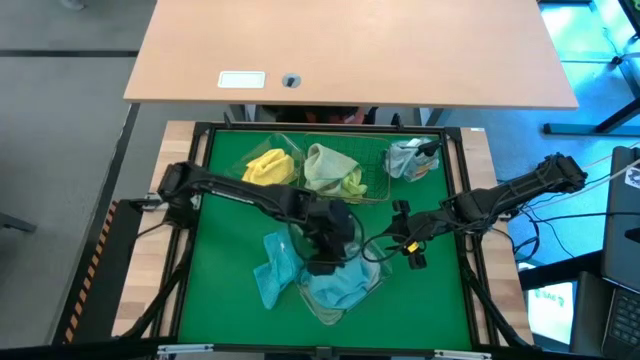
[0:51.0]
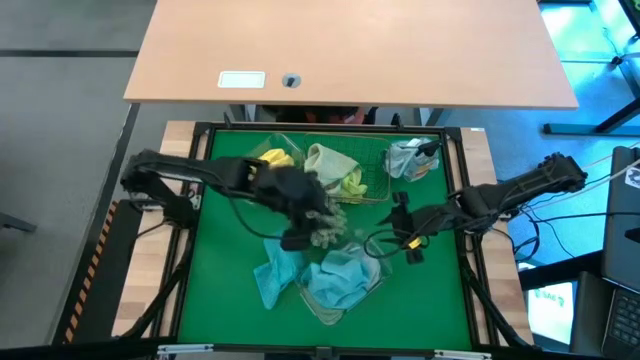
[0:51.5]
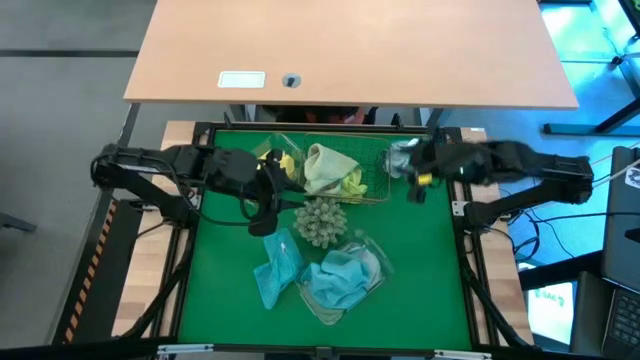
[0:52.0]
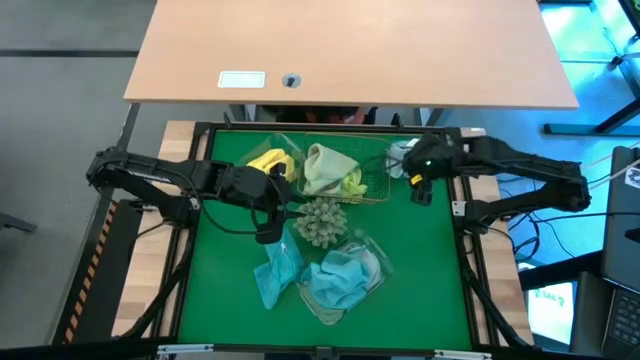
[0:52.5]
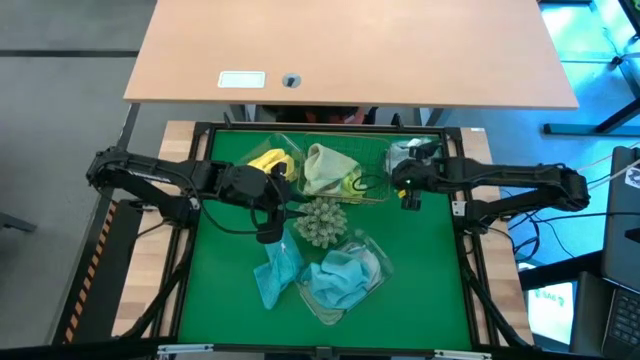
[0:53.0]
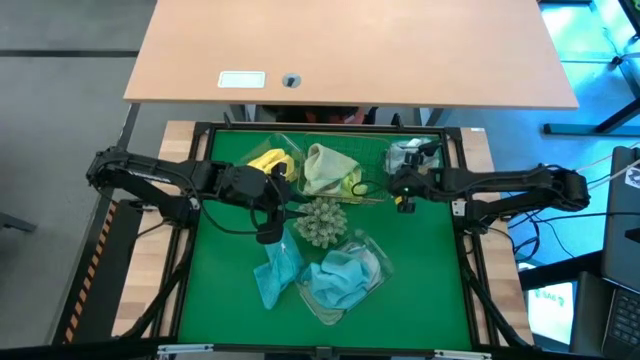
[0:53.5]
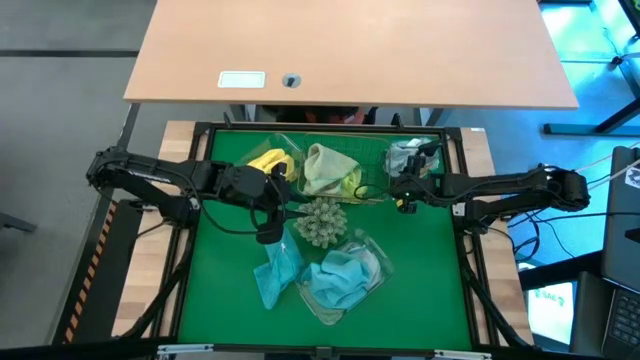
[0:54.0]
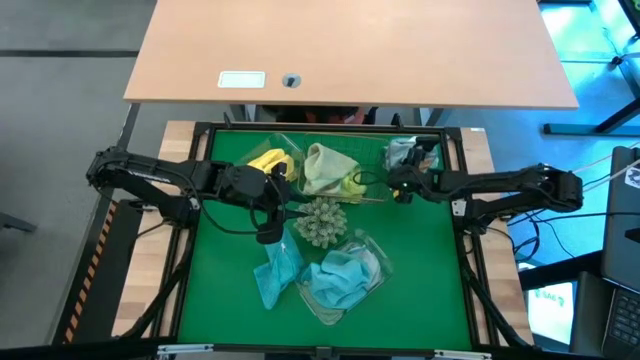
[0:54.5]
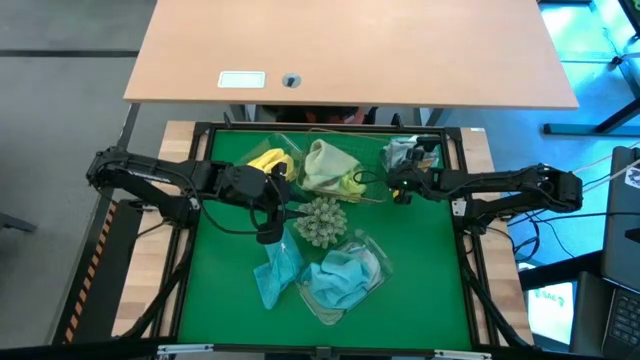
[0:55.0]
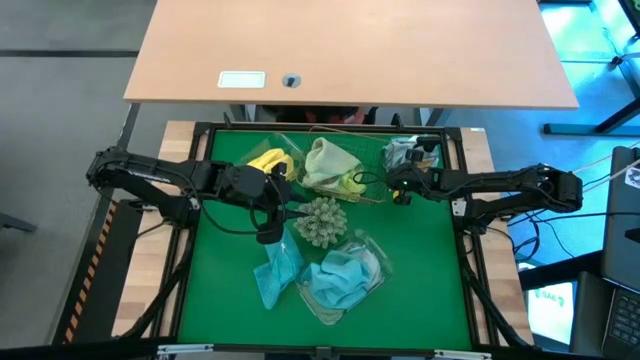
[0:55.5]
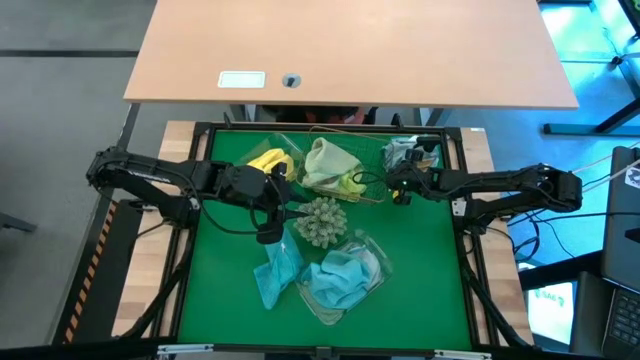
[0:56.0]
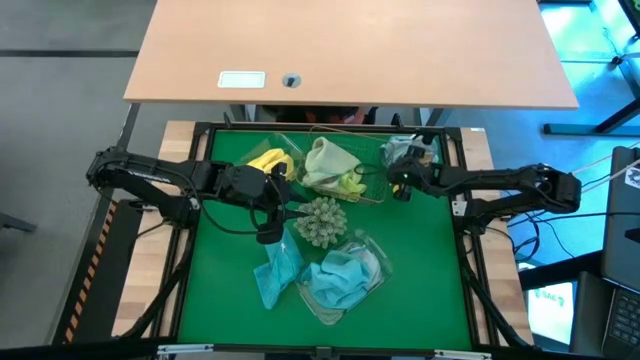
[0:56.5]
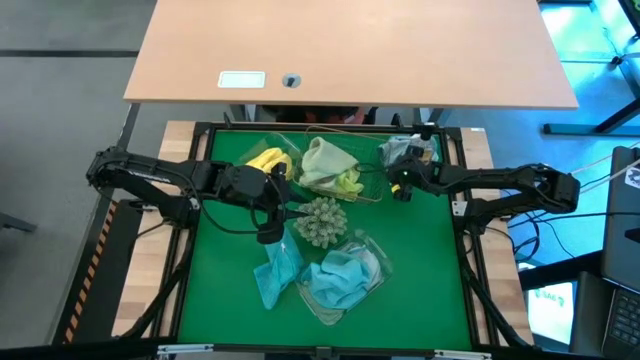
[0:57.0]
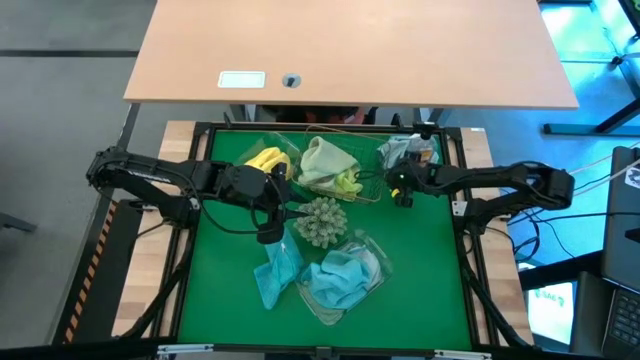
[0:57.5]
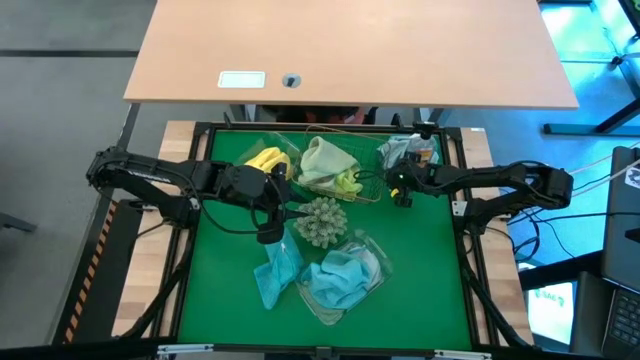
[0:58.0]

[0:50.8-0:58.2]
Task: Sort microfiber towel by color & place in baskets
Put the light blue microfiber towel into the bottom transparent bin

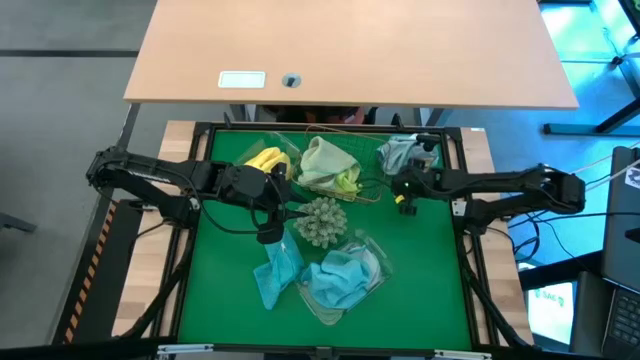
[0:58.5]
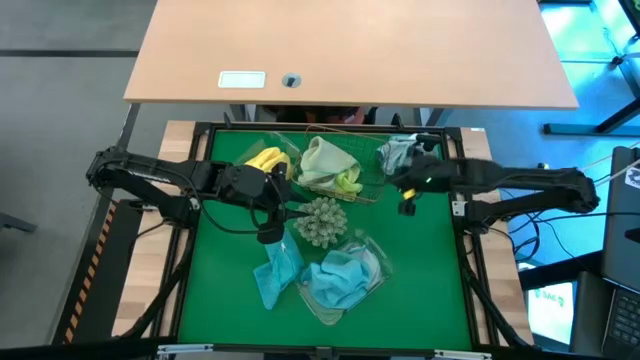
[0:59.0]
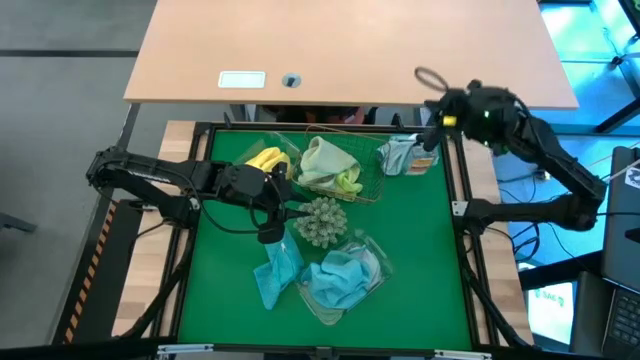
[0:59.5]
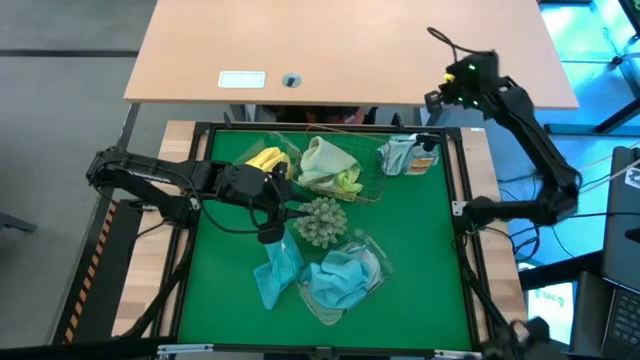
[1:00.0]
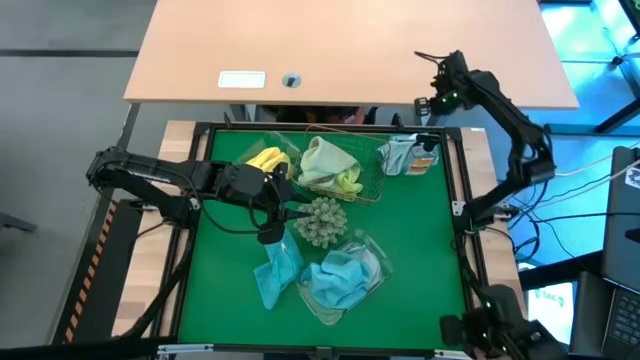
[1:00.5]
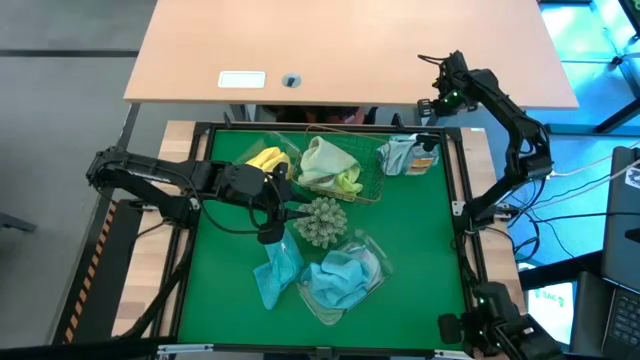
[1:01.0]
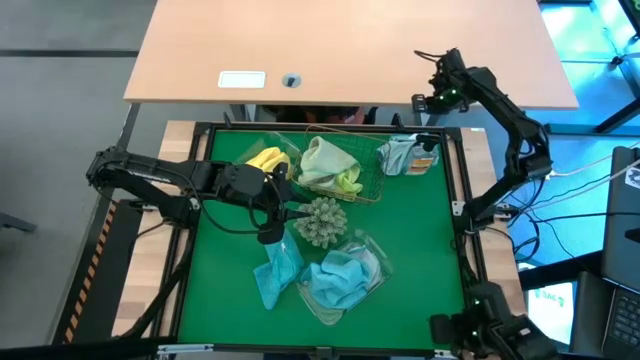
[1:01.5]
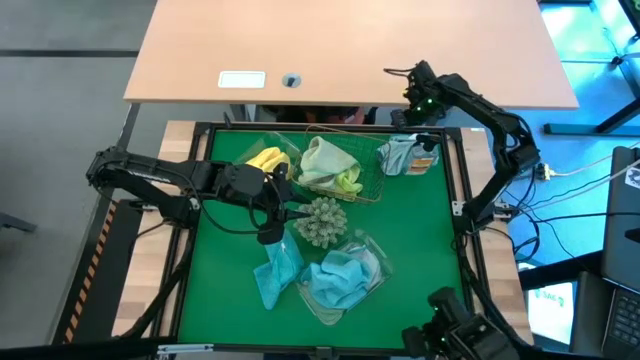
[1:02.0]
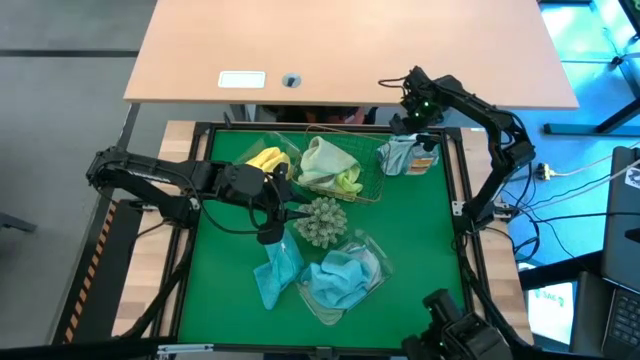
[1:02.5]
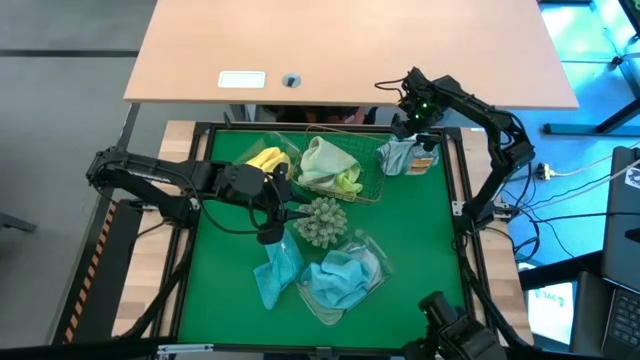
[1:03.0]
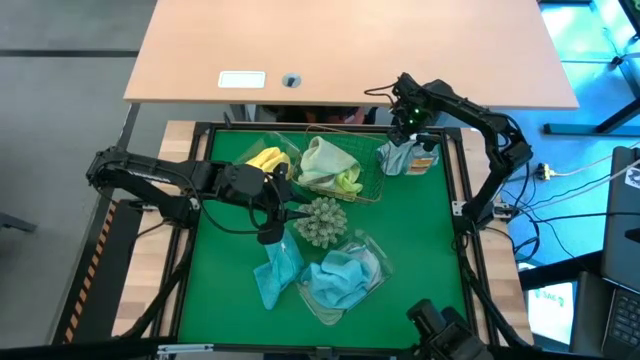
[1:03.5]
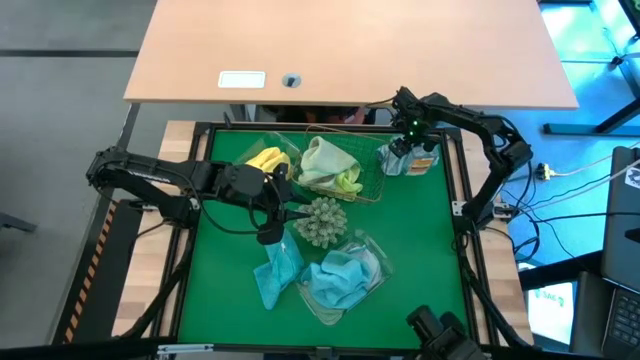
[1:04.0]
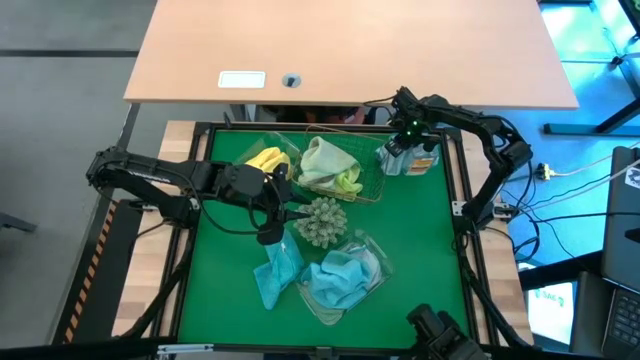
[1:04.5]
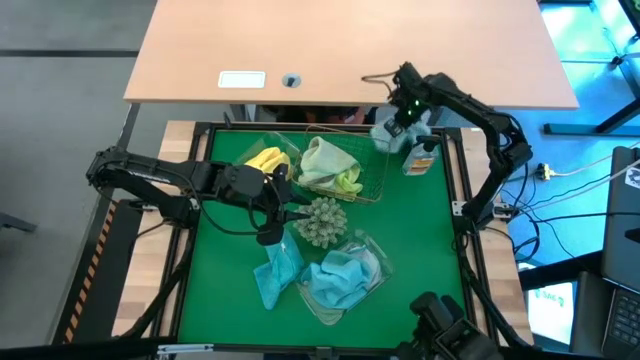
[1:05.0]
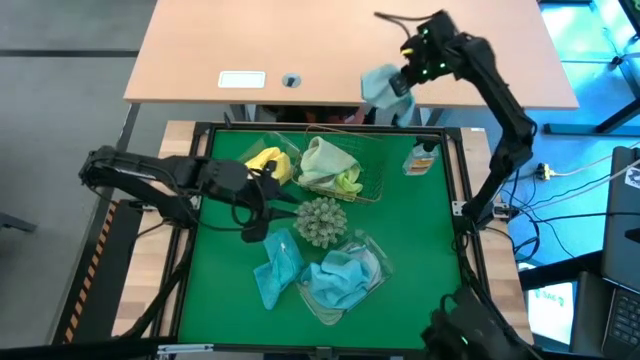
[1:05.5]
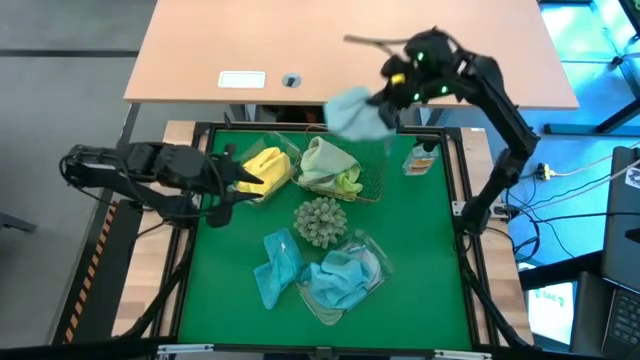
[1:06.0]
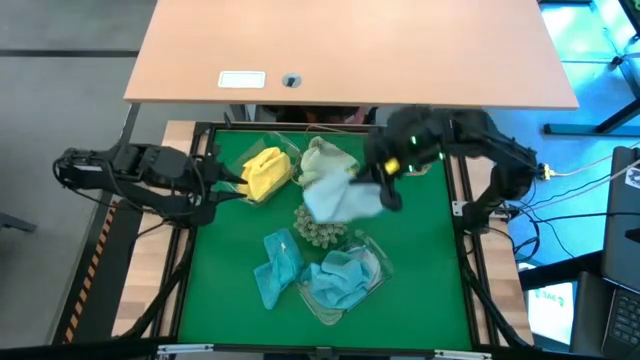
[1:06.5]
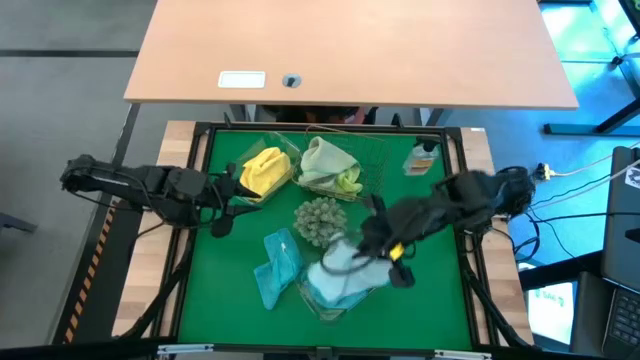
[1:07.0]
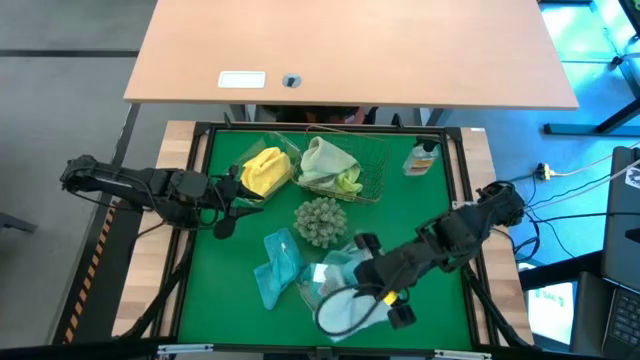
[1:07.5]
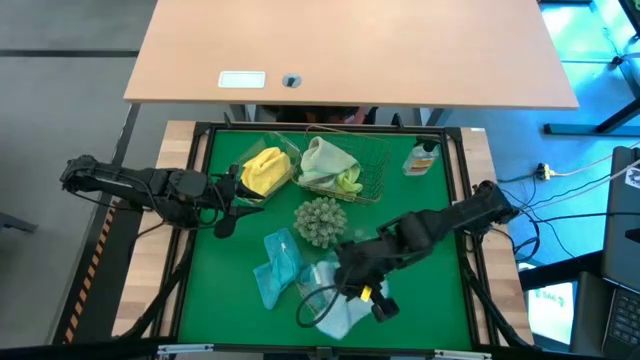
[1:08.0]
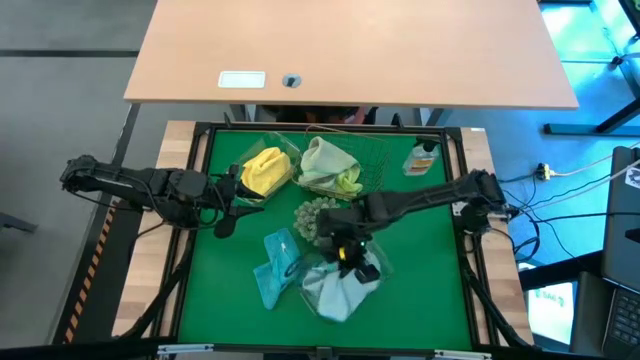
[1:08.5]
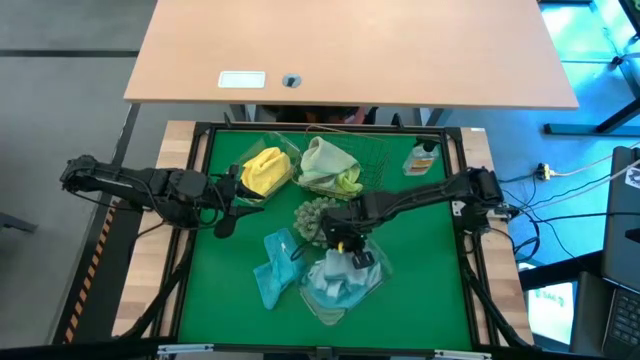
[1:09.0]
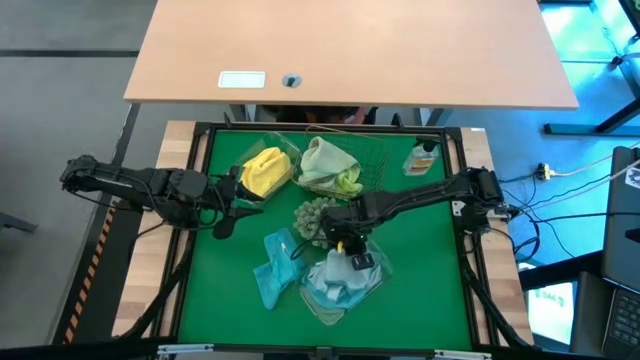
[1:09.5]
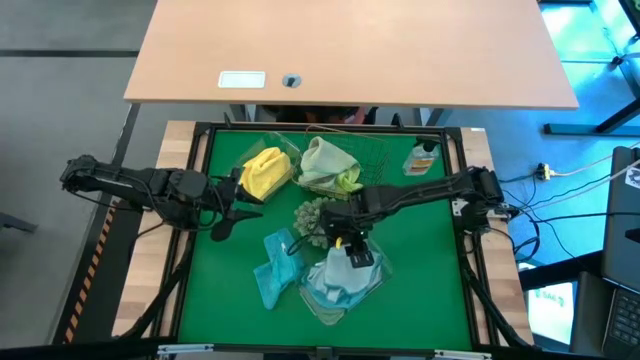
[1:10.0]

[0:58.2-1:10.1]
Put the light blue microfiber towel into the bottom transparent bin

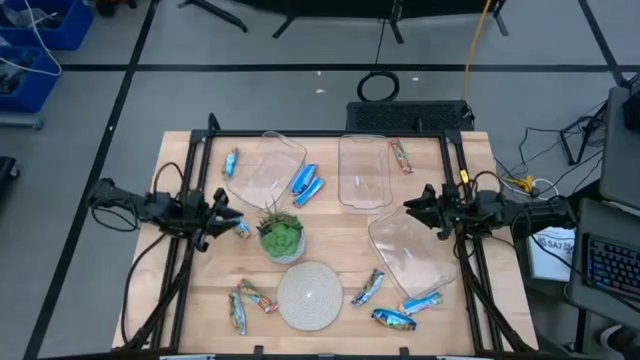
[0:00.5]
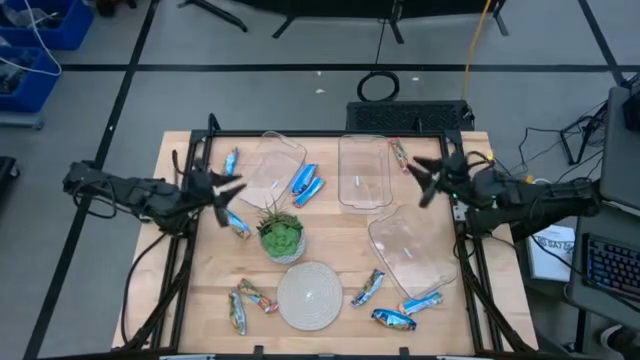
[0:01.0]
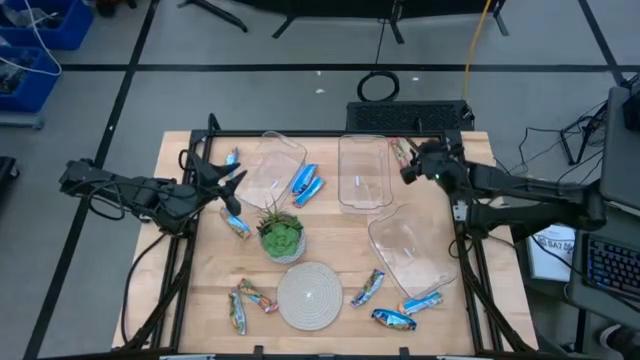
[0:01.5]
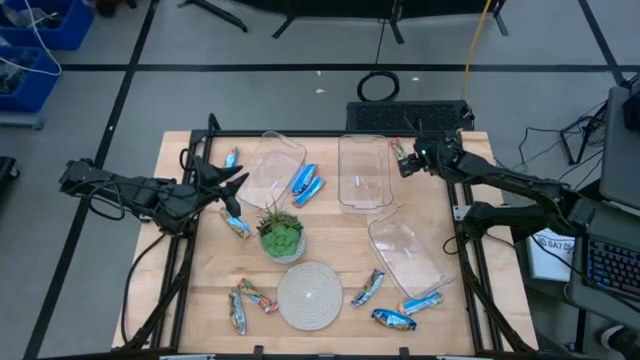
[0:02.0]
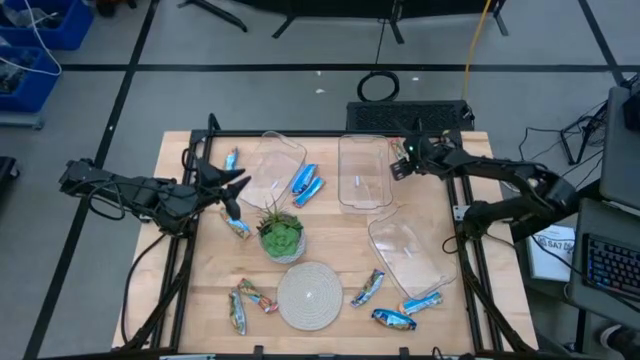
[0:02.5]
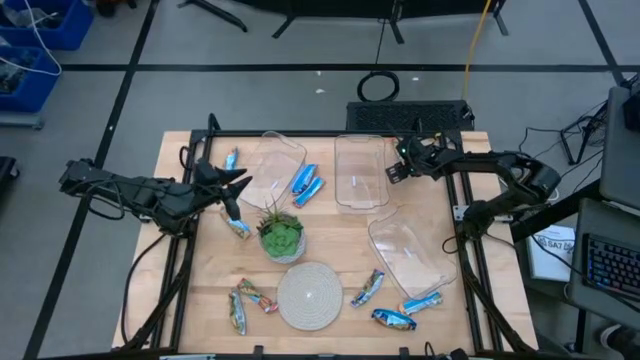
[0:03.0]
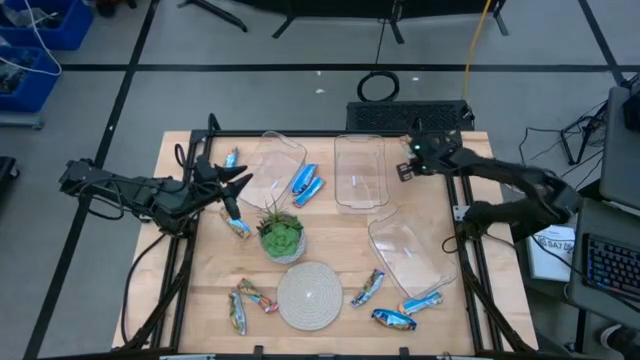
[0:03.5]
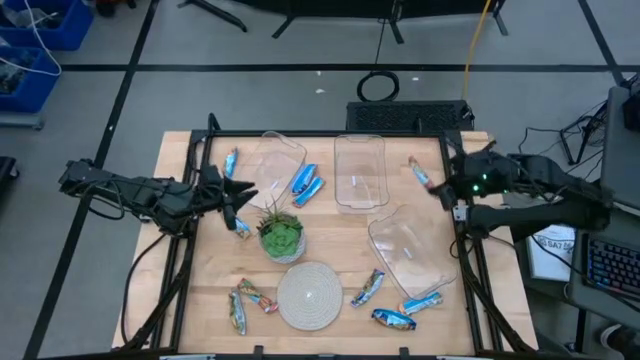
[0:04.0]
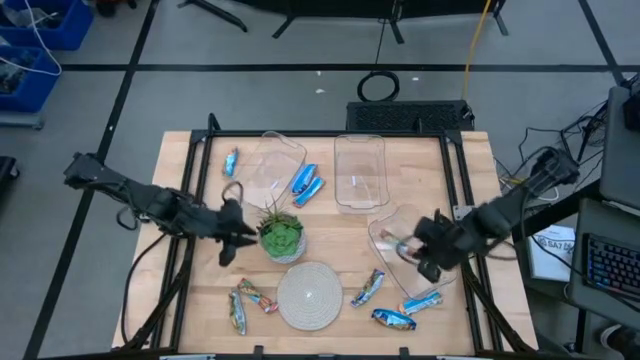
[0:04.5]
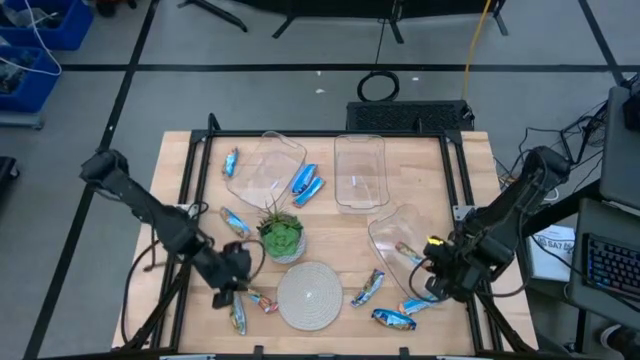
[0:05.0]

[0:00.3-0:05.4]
Task: Pick and place Granola Bars by type
Put the red granola bar into the bottom right transparent bin
